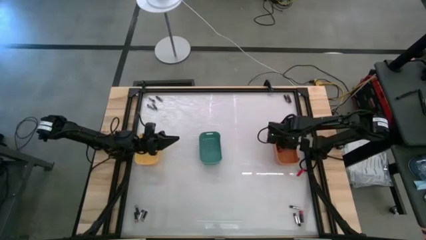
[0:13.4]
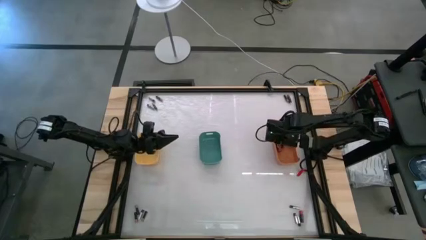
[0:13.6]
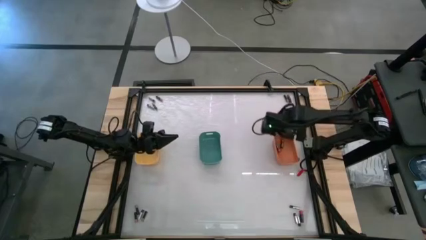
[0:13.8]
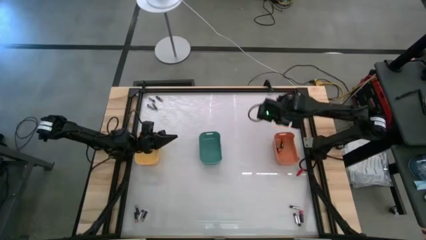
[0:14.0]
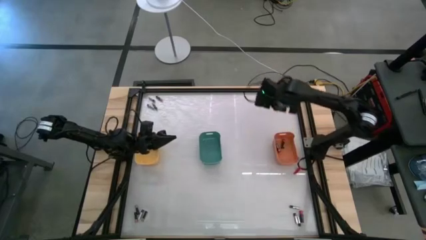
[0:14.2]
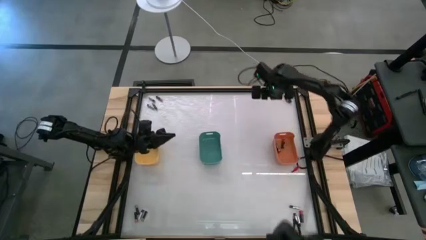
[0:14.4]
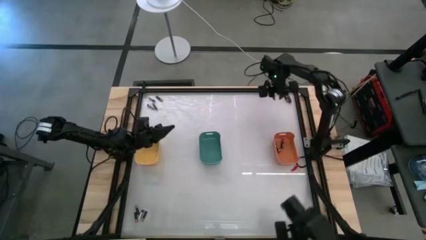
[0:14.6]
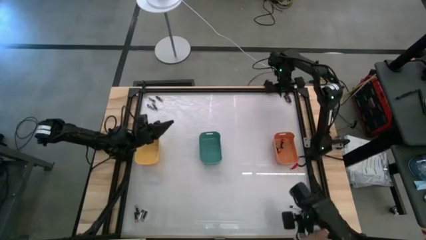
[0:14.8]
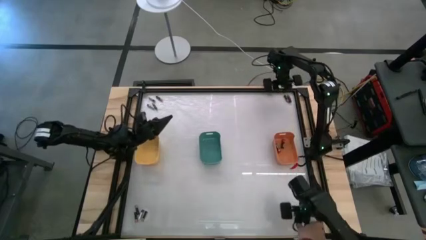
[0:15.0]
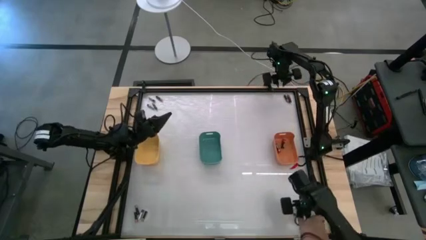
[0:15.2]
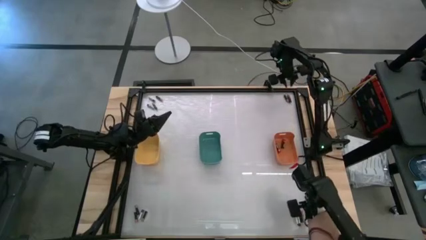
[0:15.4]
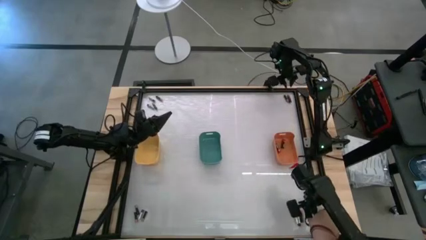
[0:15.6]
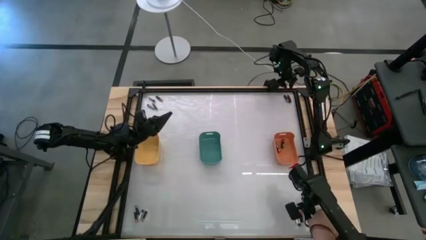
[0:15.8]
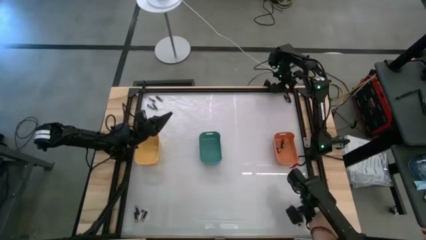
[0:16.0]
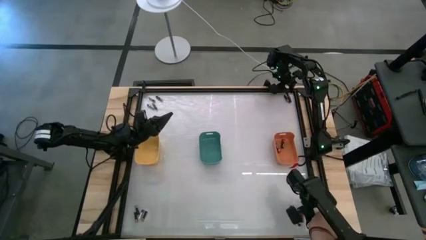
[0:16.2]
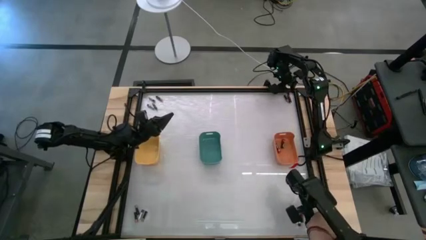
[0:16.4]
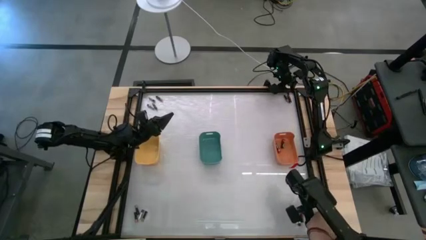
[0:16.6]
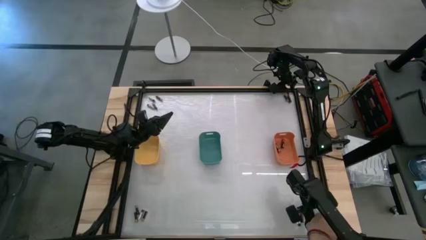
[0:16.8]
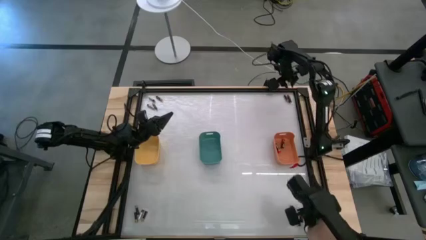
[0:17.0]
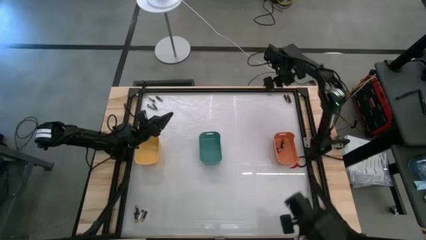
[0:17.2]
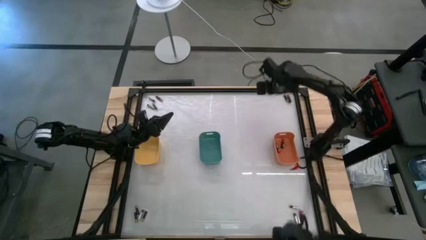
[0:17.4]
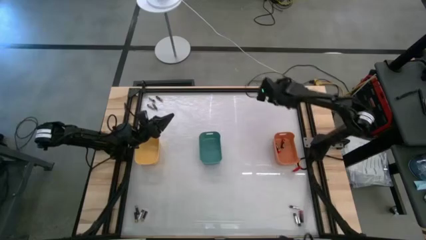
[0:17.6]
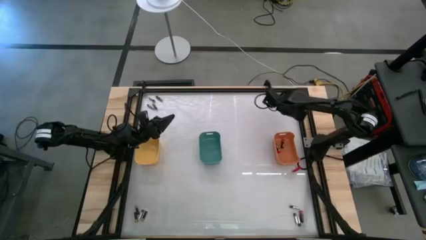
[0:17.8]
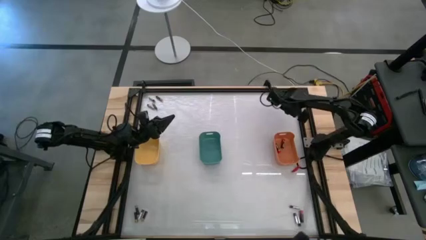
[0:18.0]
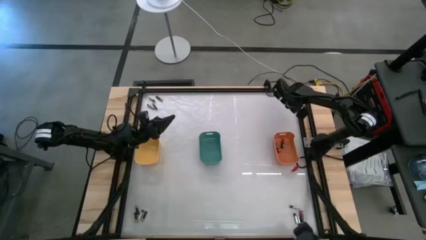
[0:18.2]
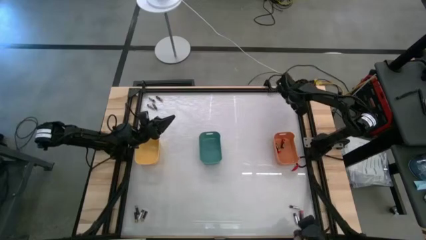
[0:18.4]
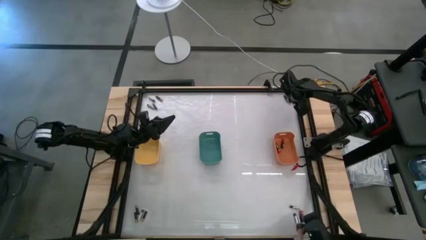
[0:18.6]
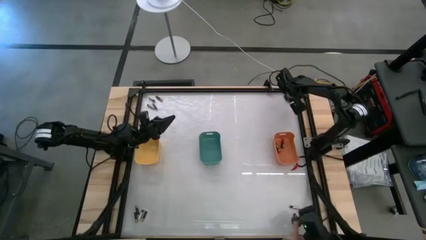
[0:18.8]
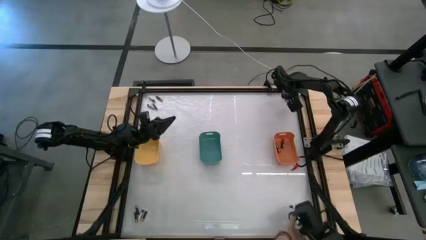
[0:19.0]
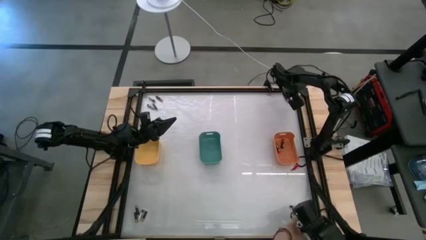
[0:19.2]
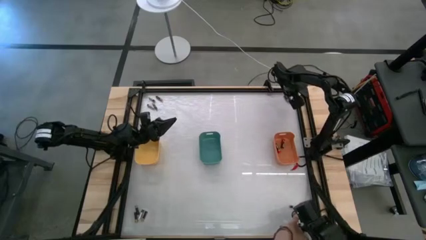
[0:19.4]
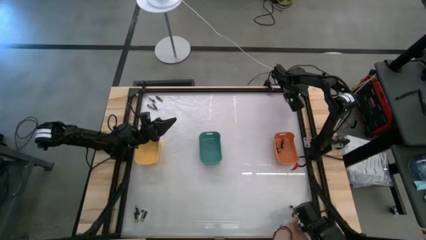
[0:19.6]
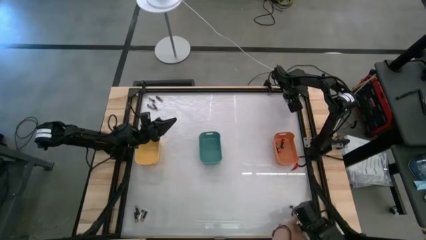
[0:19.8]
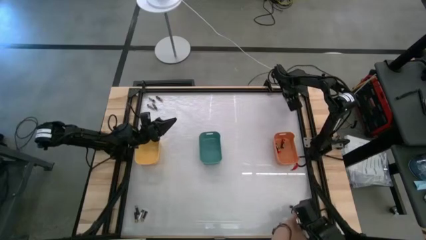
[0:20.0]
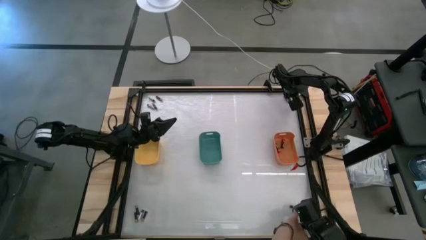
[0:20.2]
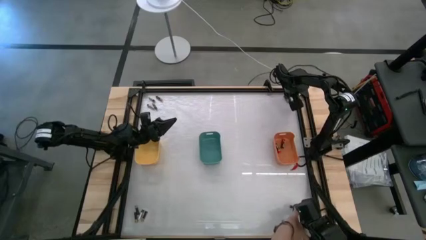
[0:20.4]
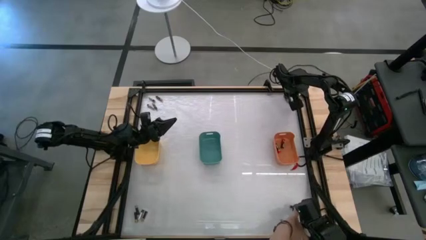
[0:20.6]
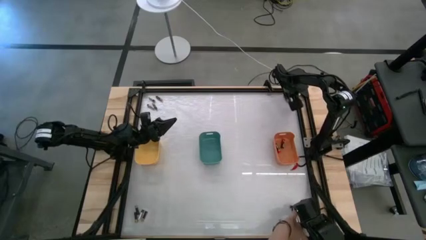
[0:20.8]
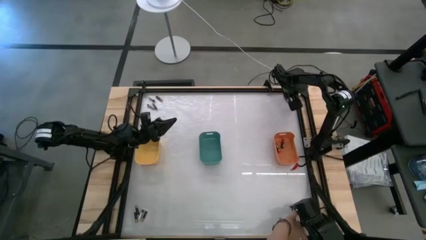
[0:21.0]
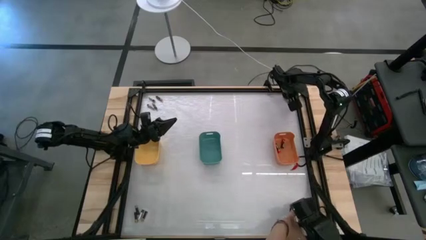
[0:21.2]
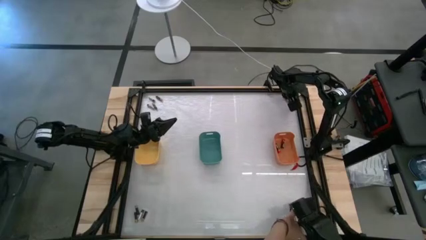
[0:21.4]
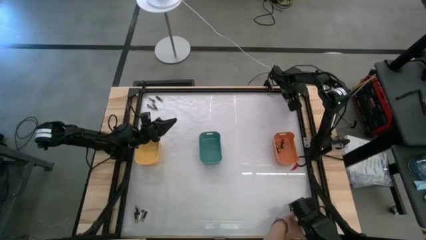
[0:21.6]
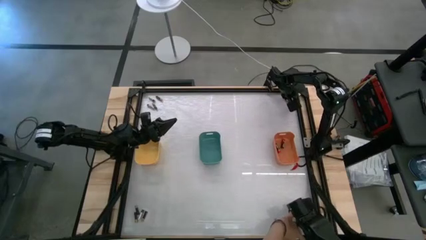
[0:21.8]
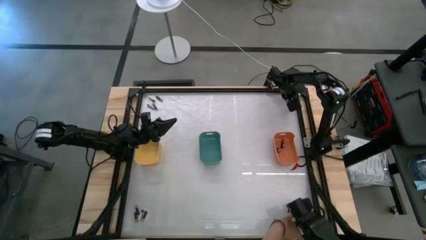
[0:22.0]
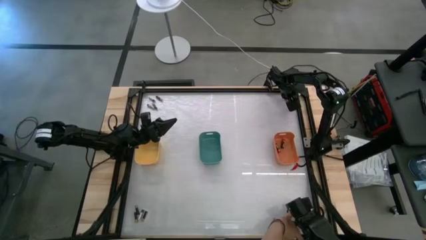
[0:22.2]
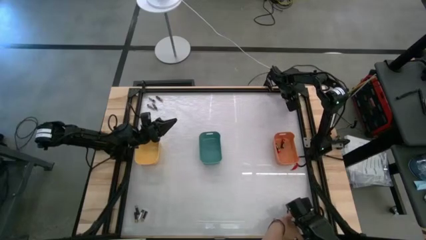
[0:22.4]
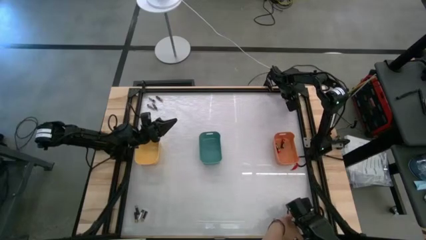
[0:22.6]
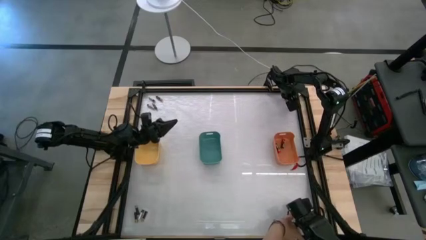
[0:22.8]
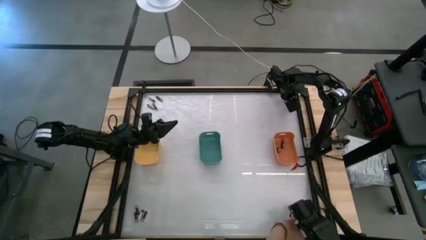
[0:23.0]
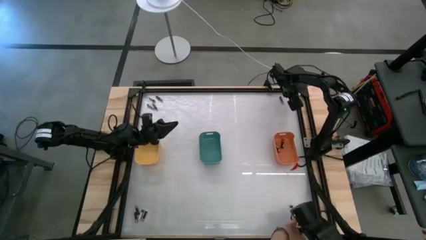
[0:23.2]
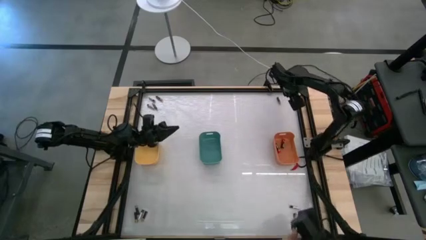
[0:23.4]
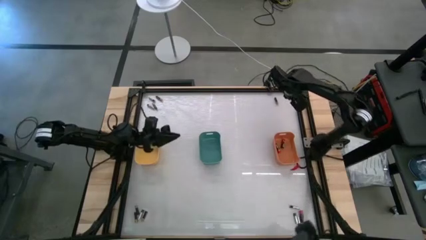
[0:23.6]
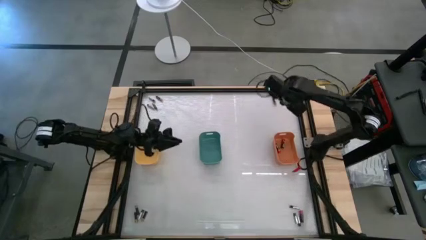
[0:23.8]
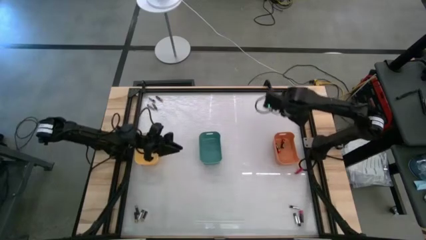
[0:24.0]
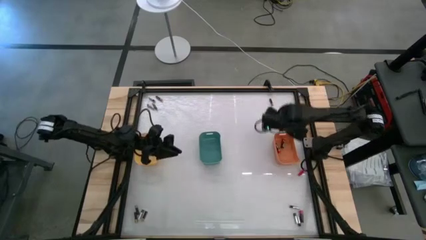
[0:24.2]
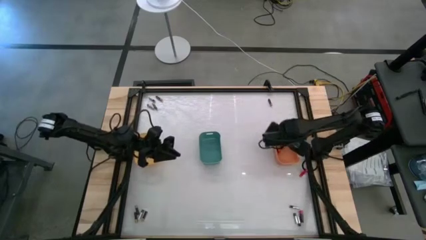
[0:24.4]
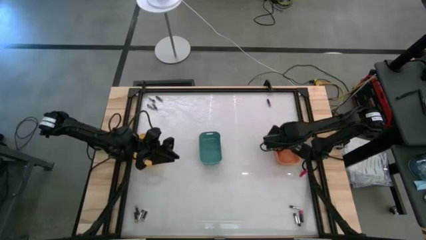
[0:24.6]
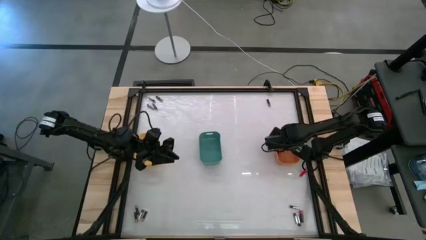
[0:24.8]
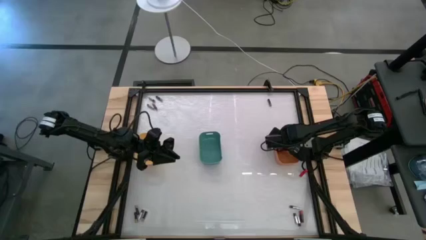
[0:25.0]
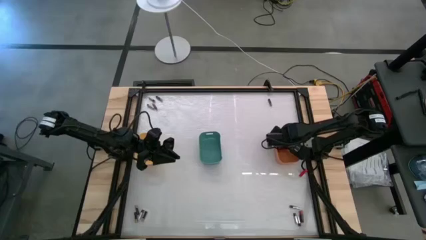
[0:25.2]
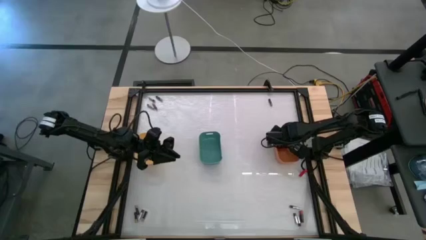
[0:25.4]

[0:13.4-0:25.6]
Task: Sort batteries
Put the red battery into the orange bin

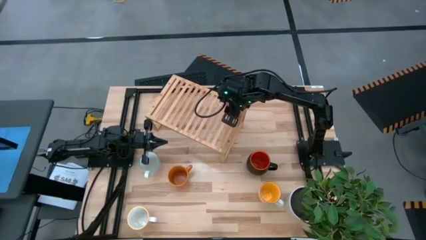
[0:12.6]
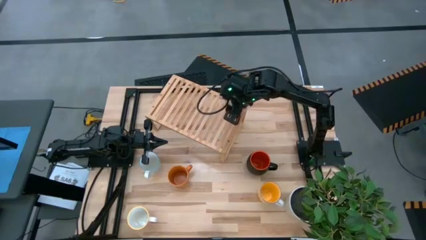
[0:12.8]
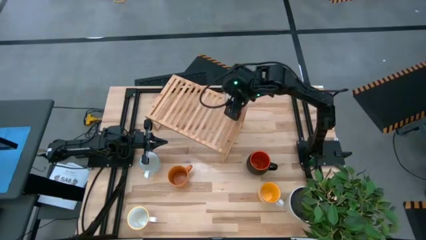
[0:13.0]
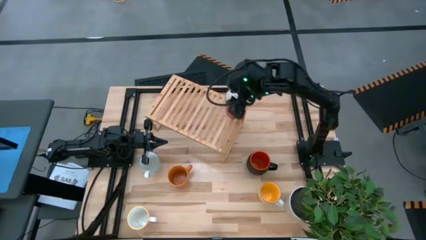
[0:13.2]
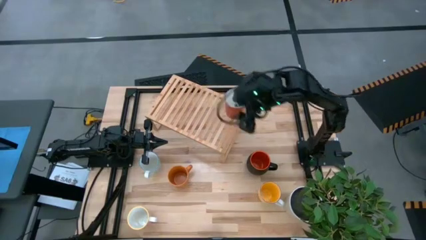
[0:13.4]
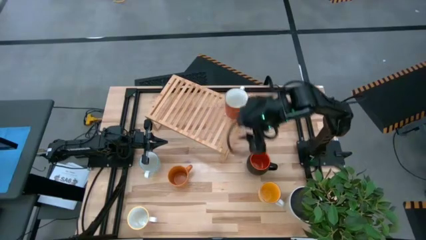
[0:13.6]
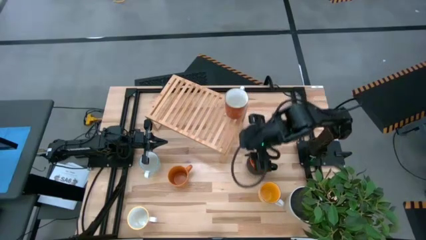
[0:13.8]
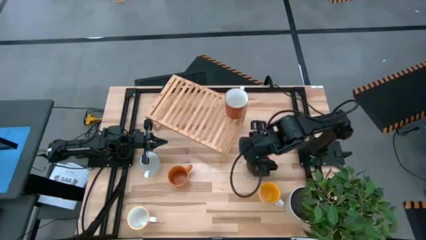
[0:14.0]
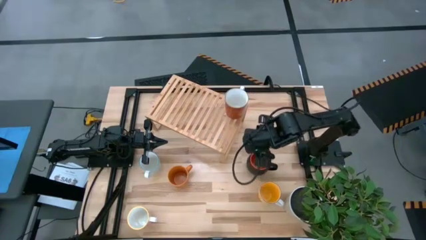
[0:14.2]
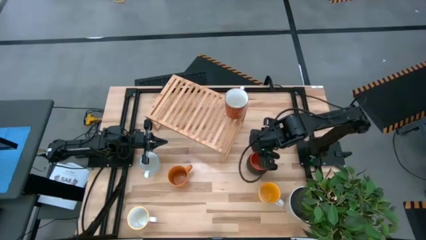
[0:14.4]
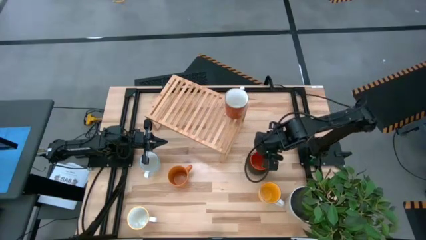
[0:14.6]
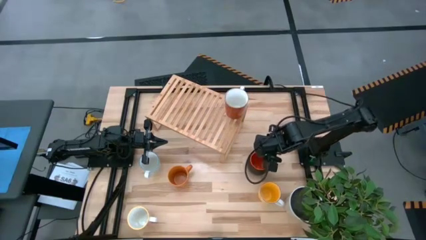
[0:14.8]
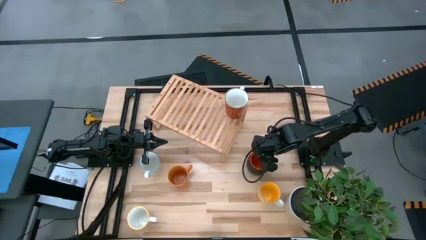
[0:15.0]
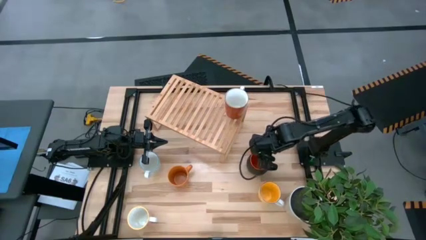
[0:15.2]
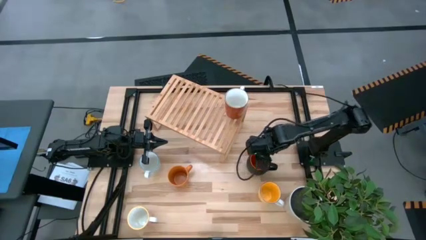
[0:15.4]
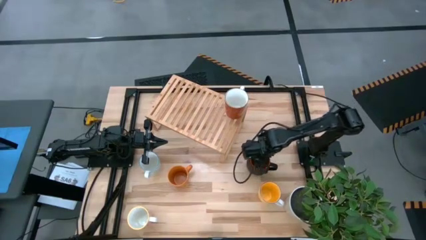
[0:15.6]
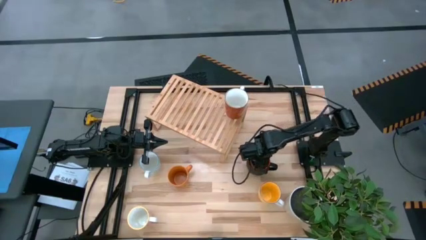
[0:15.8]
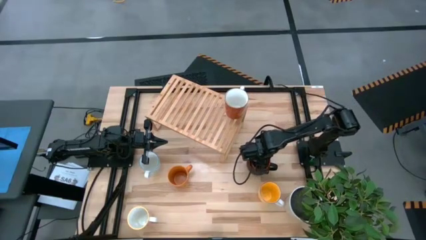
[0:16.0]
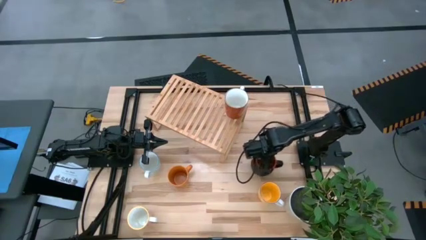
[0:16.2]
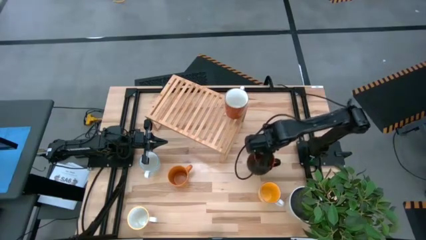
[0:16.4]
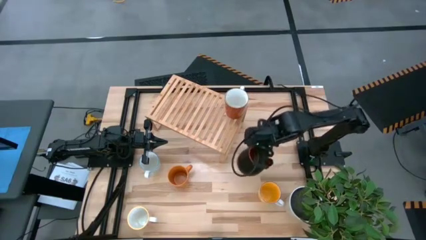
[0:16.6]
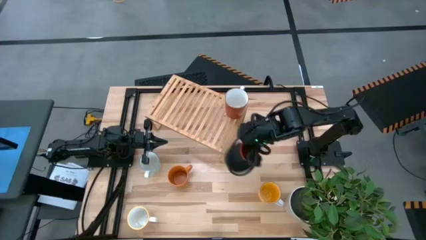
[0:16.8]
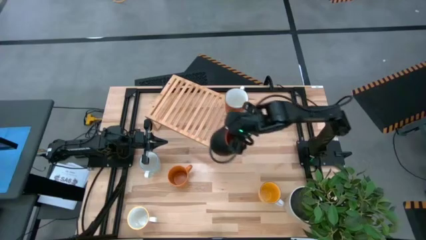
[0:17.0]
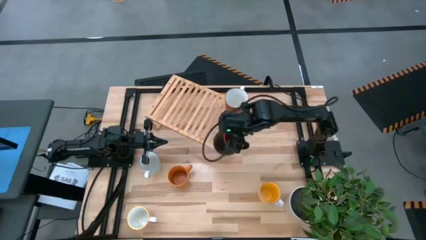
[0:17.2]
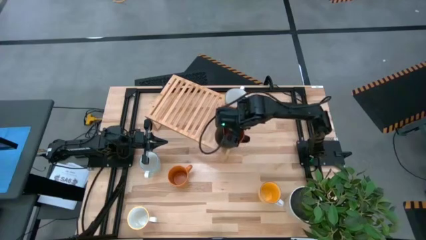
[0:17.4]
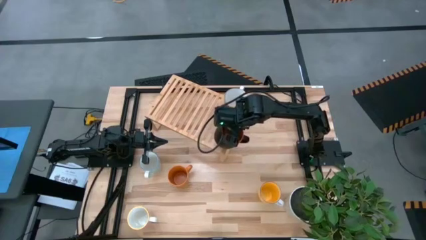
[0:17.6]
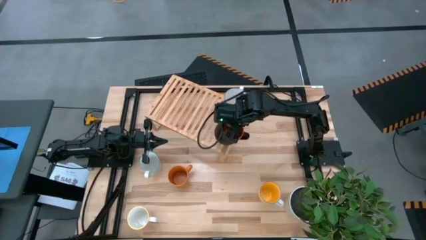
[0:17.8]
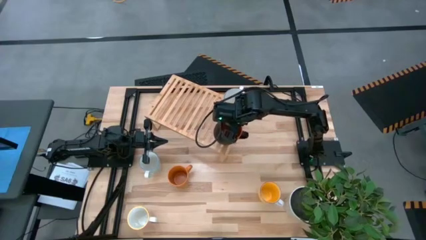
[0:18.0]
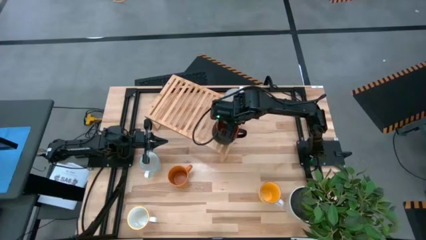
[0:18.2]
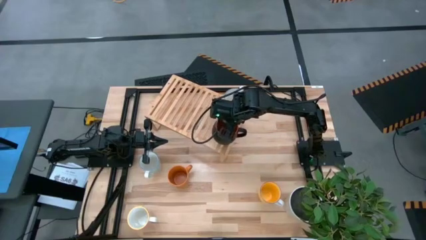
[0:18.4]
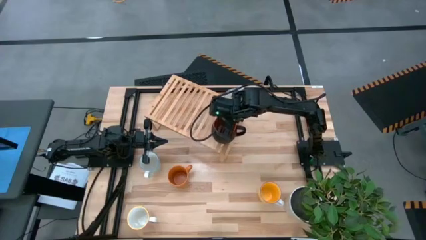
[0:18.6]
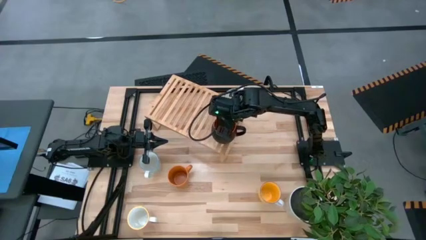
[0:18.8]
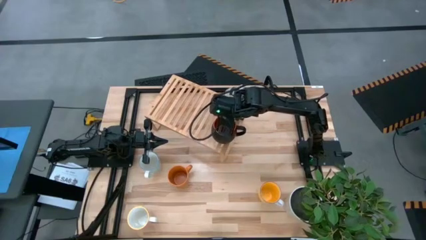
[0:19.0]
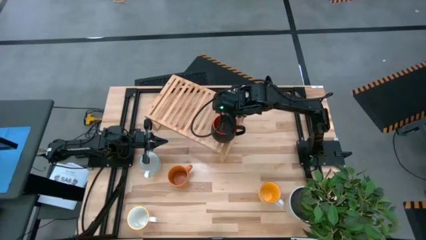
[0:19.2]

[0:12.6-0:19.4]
Task: Place coffee mugs
Put the black orange mug on the shelf
